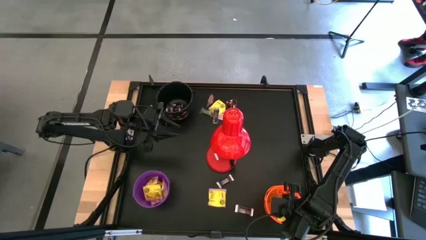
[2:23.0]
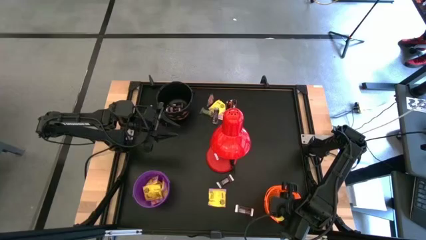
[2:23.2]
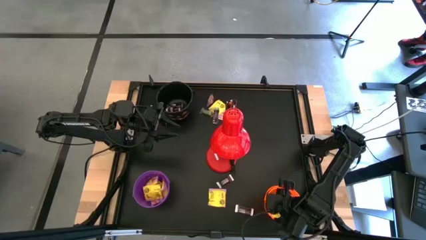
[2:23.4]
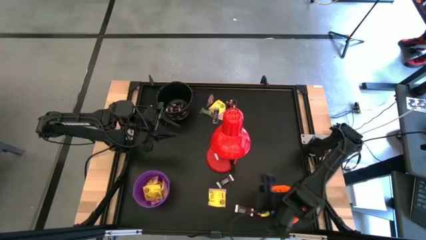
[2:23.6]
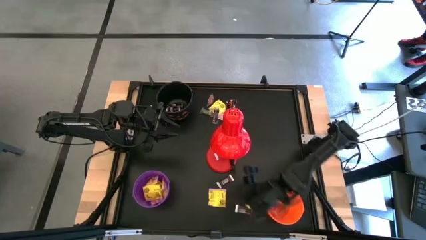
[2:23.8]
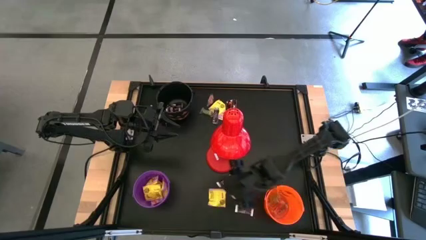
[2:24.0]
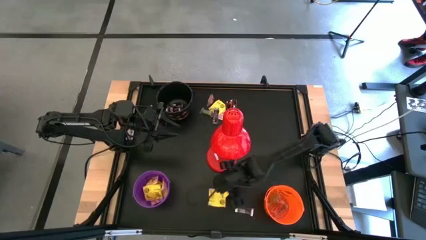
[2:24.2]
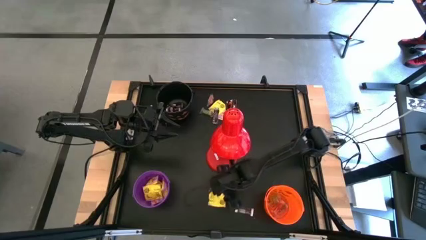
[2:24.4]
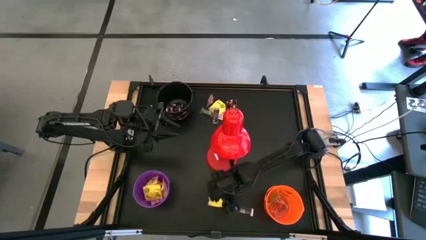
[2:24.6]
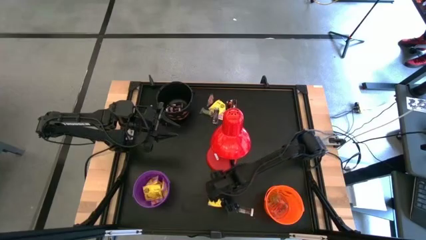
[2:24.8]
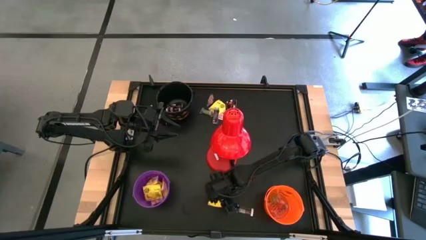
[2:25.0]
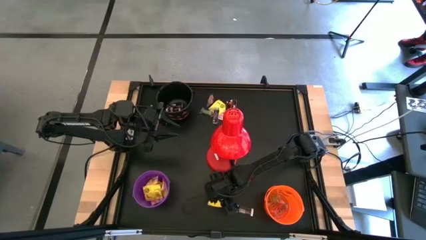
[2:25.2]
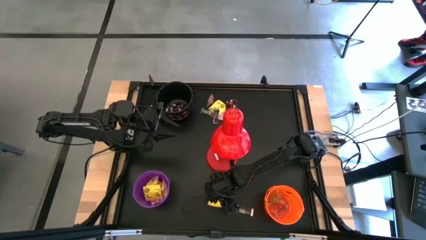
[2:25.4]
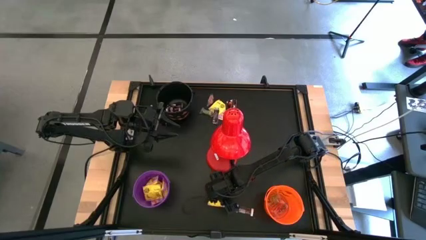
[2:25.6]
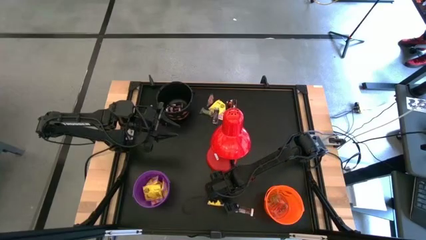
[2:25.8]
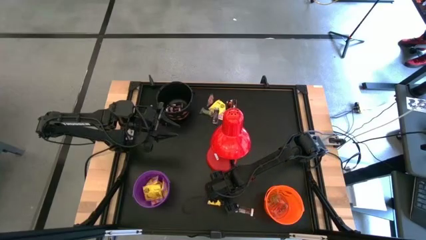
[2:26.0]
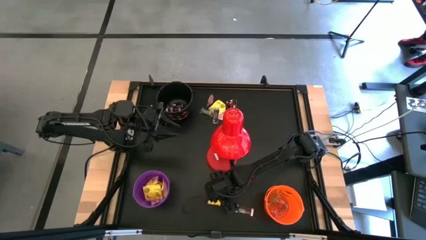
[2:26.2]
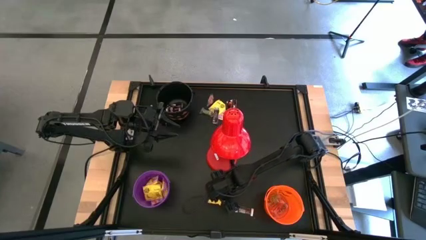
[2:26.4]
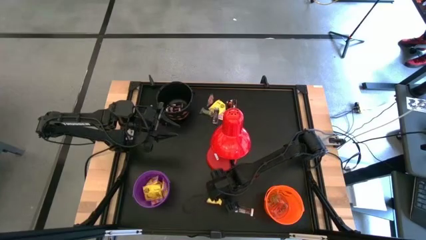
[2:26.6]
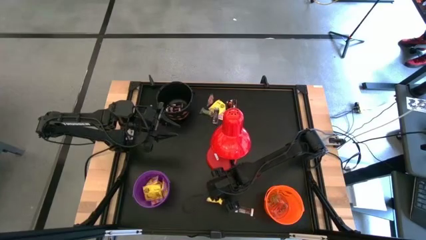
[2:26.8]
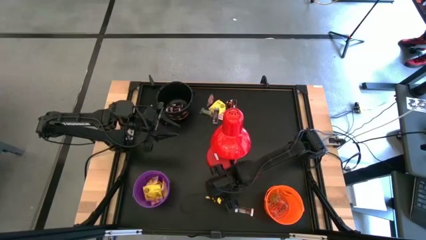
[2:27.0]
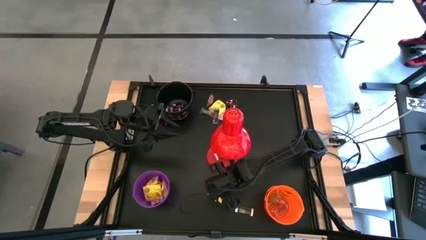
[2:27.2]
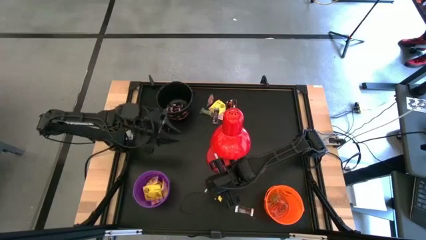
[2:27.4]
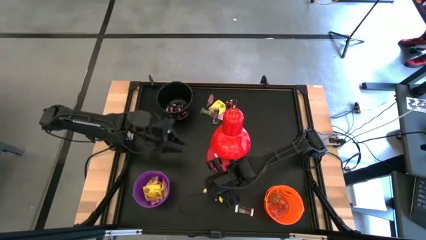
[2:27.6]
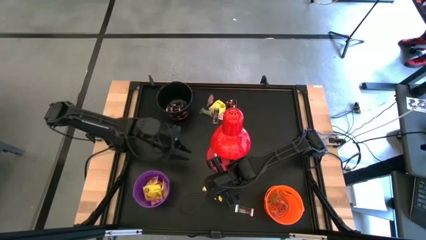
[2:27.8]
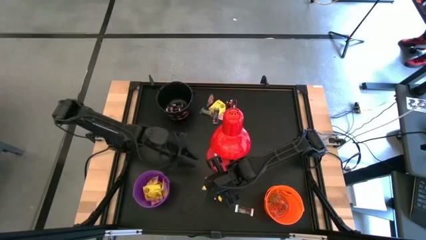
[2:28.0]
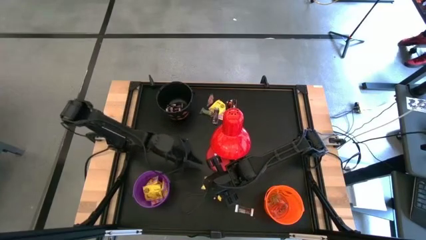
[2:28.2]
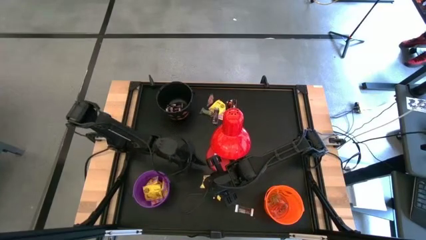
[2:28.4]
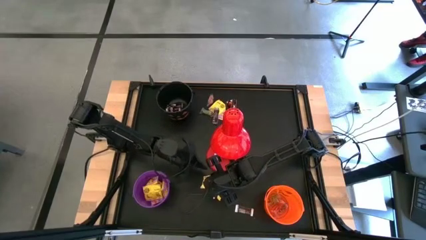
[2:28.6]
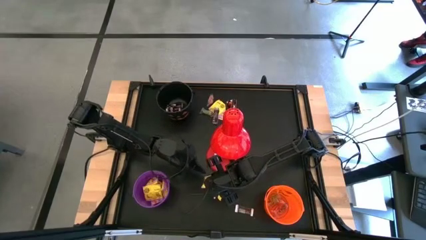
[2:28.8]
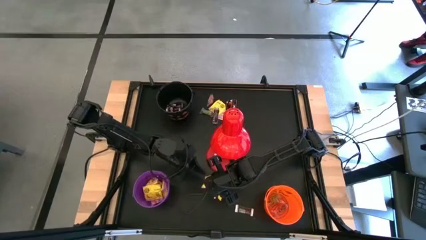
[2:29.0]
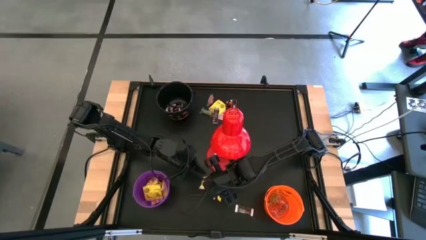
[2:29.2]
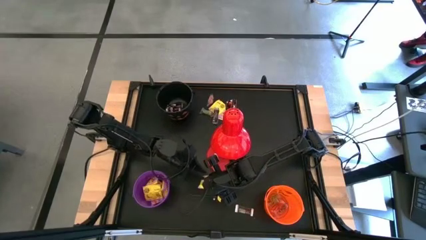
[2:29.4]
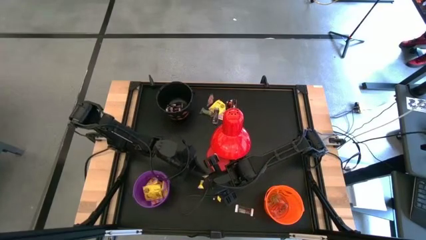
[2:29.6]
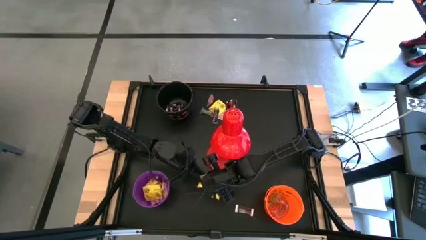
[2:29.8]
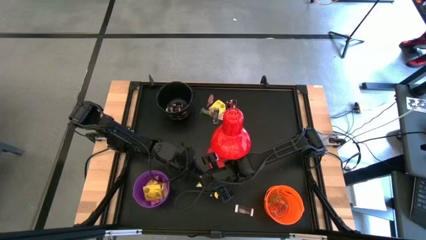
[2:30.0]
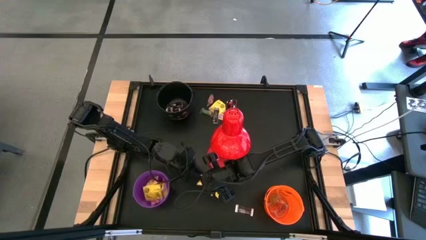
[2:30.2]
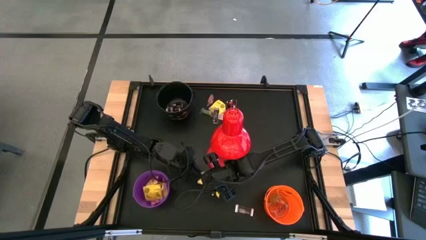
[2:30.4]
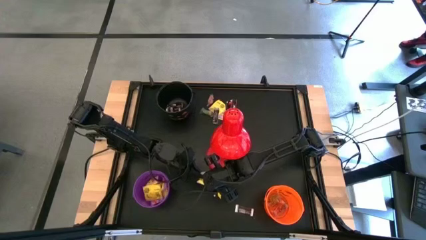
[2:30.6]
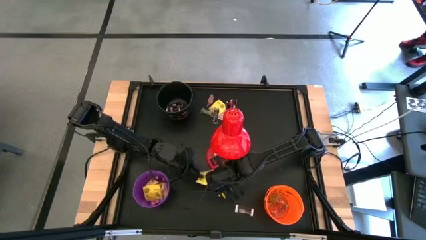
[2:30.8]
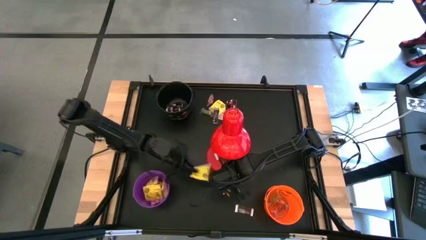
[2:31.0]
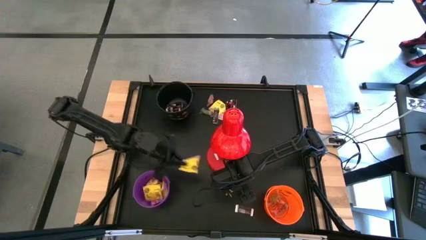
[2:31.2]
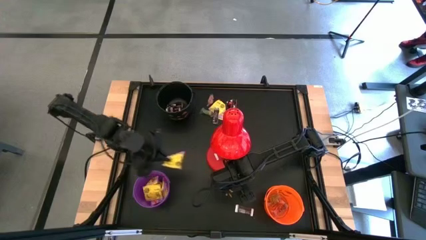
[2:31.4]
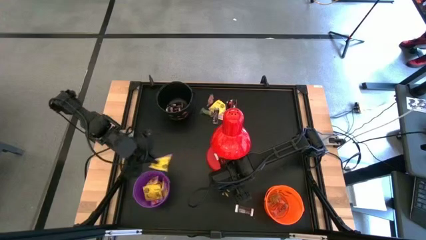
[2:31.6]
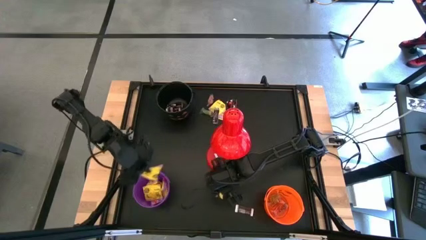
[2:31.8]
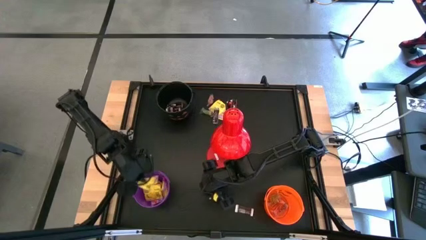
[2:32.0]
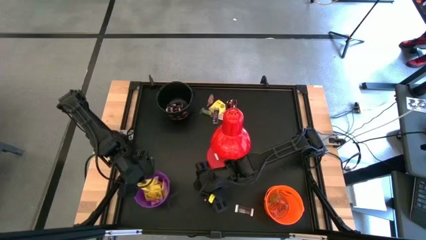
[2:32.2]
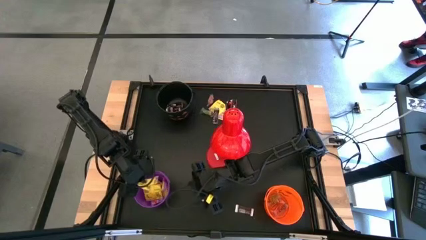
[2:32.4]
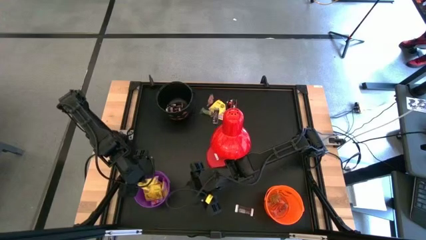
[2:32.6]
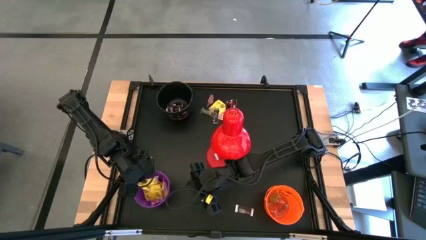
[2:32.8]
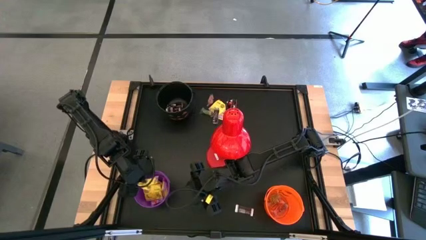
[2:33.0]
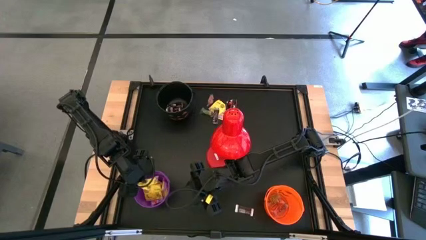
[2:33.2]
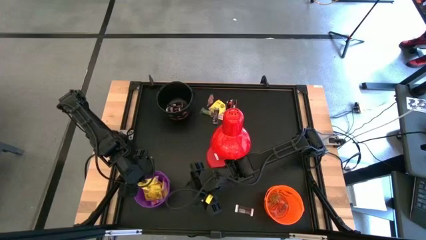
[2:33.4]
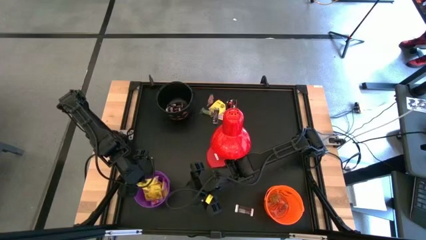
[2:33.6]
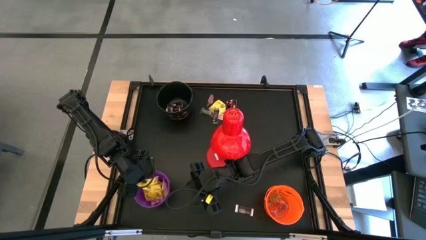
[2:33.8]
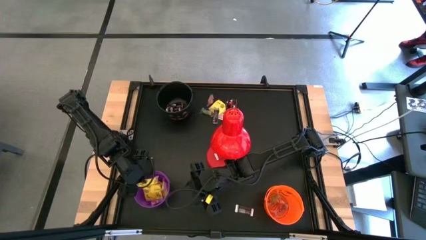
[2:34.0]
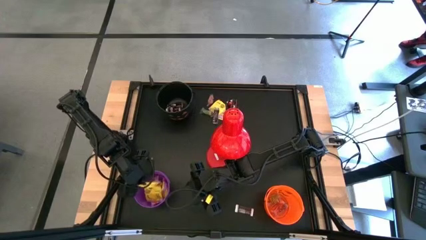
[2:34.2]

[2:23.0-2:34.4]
Task: Organize candy in baskets
Put the yellow candy into the violet bucket
